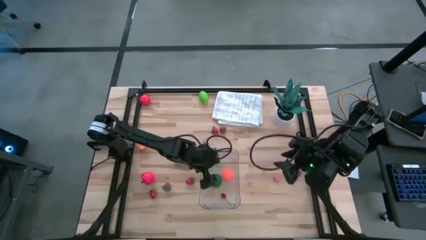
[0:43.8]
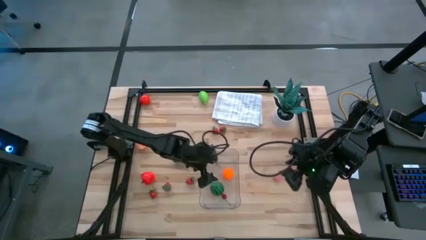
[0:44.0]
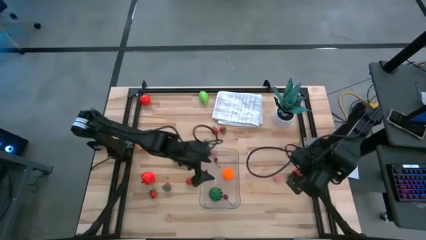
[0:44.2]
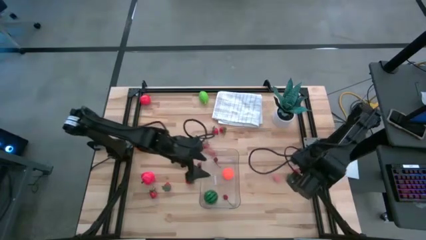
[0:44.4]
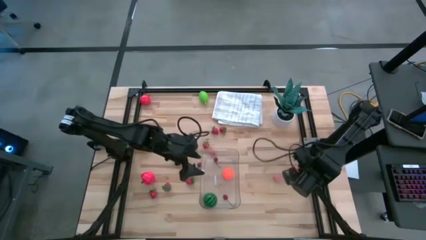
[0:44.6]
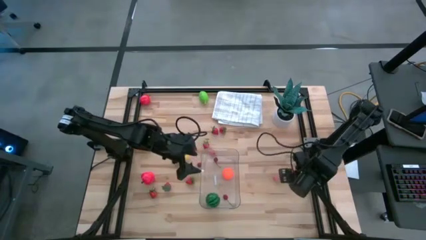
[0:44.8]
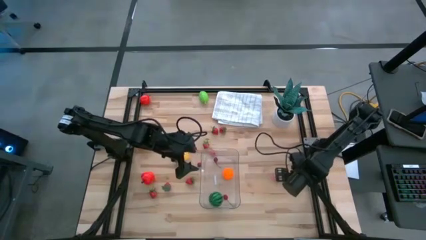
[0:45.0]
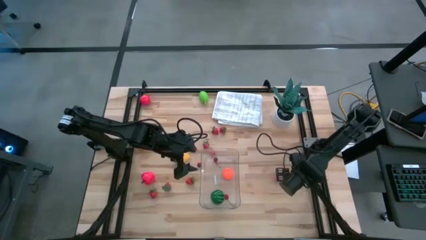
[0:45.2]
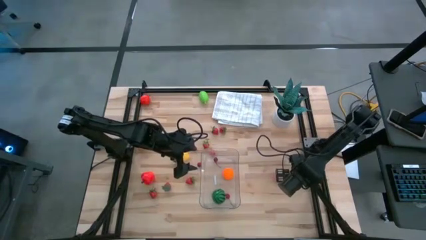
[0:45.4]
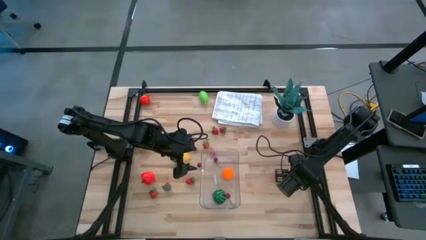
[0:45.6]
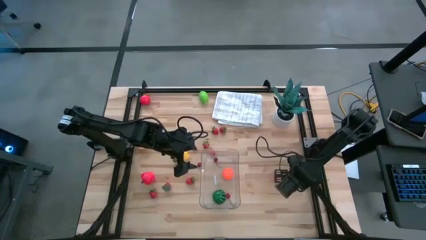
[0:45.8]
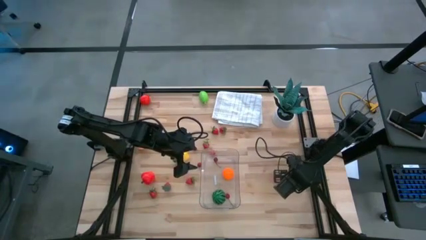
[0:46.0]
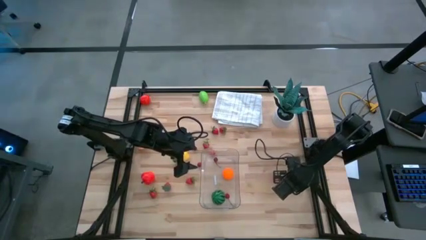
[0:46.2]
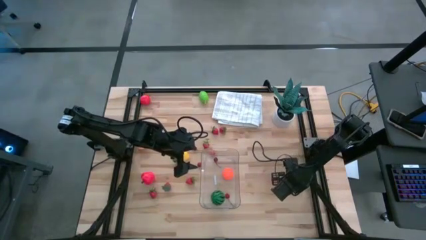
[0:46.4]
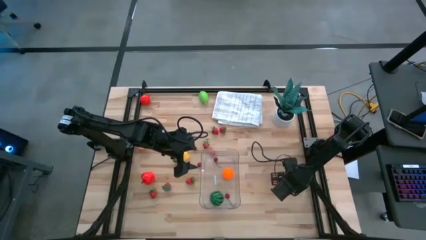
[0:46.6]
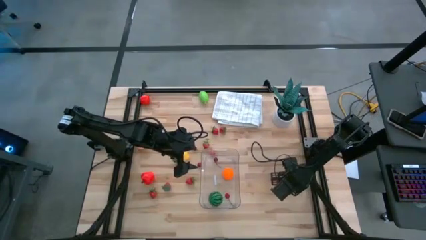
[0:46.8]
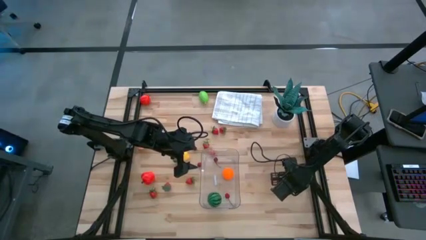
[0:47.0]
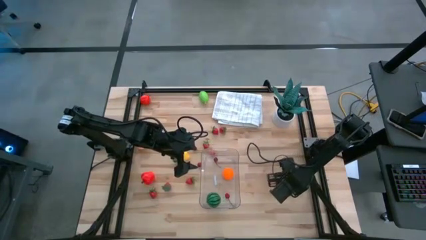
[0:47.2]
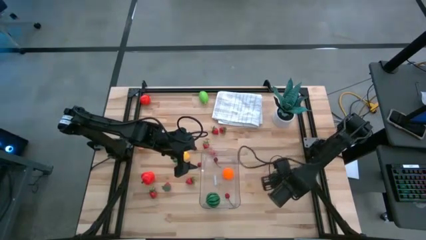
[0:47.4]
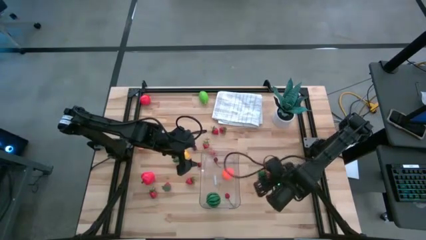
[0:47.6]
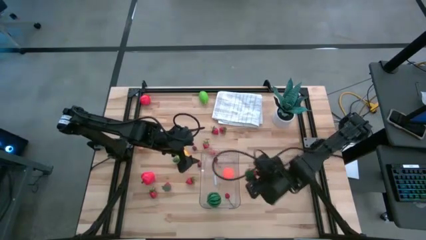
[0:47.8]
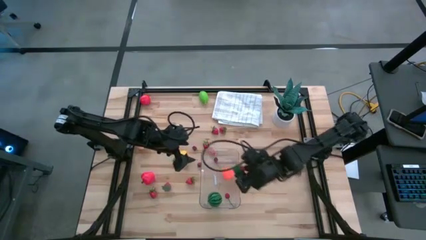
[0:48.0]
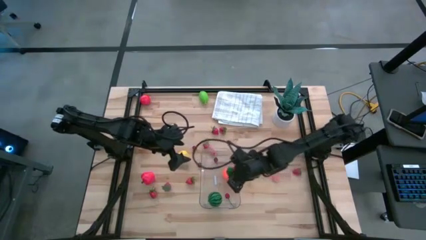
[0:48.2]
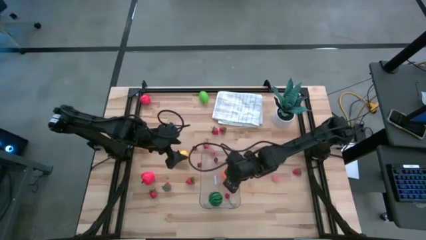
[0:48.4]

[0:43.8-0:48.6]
Task: Pick and placing Produce into tupperware
Put the orange tomato into the transparent bin

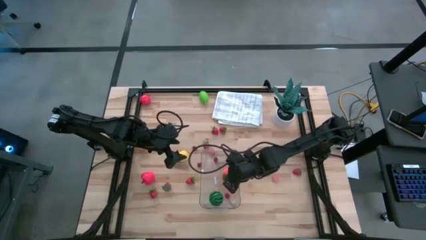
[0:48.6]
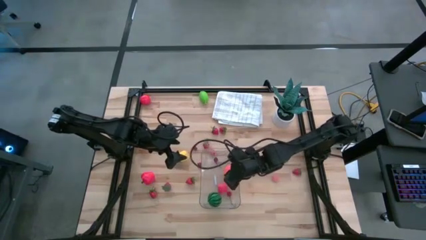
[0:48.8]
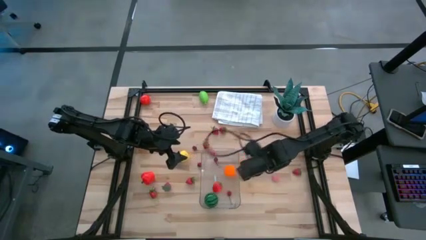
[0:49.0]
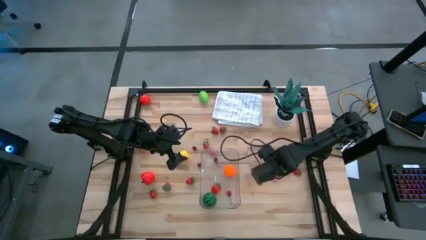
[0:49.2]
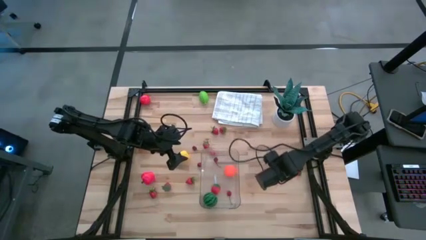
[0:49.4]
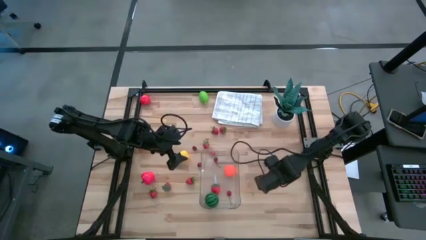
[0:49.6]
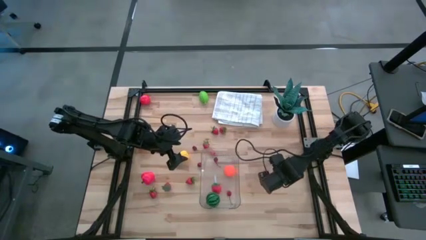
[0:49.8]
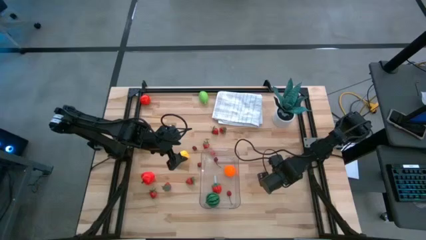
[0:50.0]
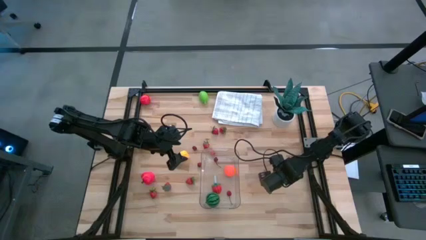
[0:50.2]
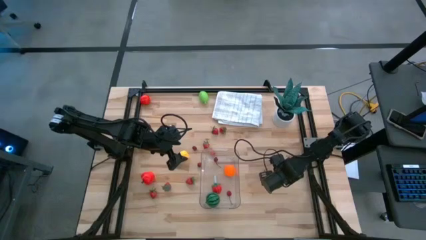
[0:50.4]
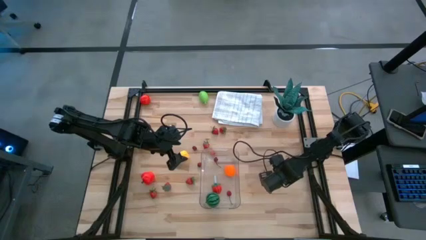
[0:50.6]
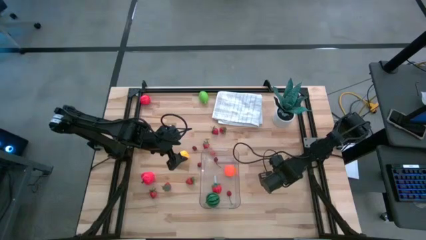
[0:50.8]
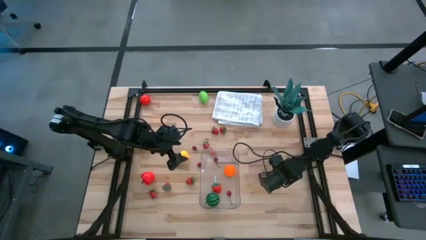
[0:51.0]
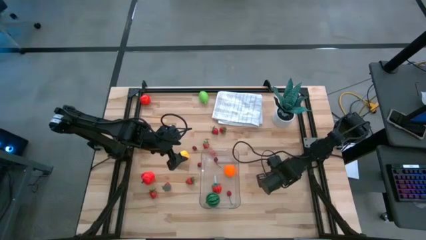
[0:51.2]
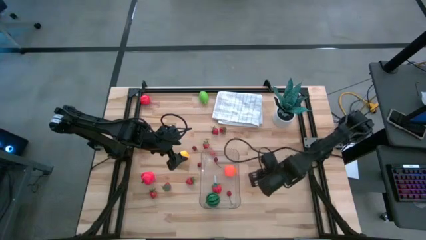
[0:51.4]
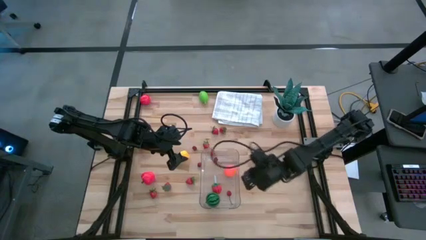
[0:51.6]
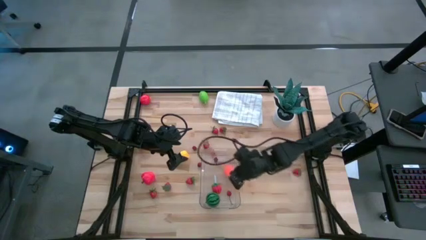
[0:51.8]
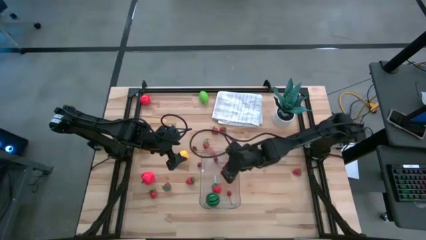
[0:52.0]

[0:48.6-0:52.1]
Put the pink peach into the transparent bin

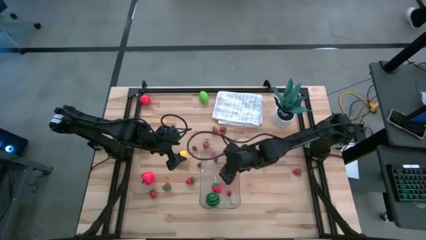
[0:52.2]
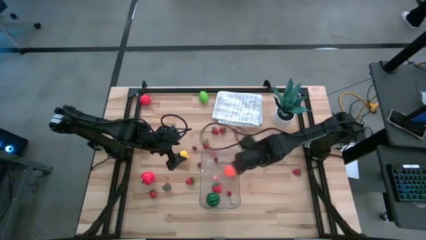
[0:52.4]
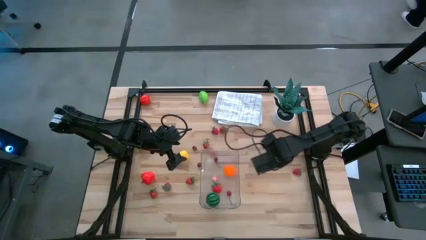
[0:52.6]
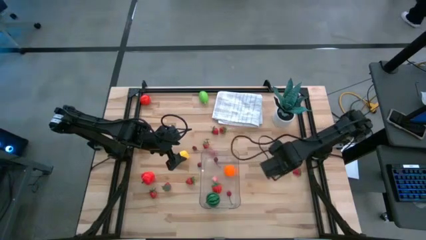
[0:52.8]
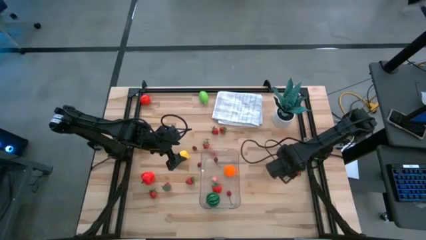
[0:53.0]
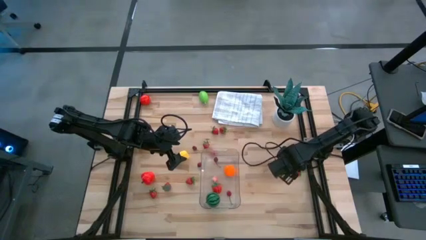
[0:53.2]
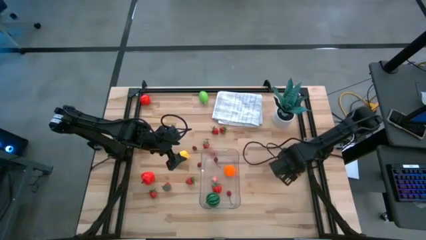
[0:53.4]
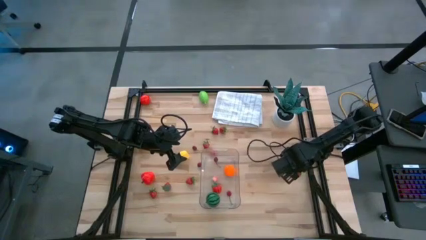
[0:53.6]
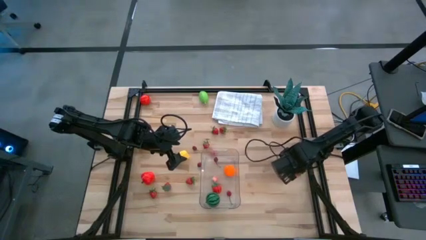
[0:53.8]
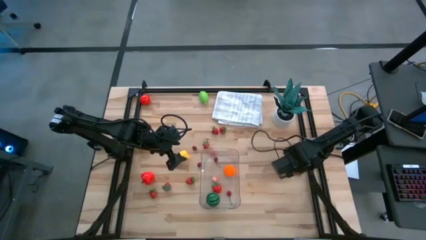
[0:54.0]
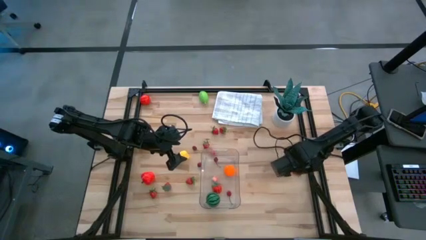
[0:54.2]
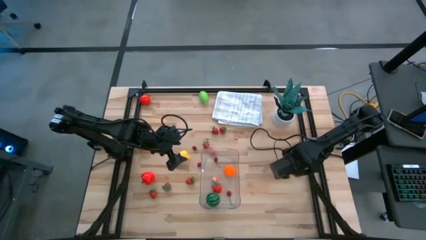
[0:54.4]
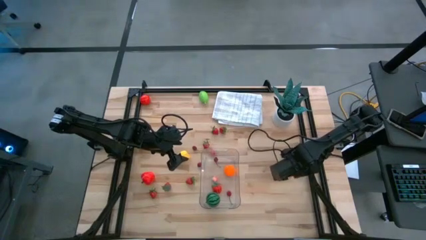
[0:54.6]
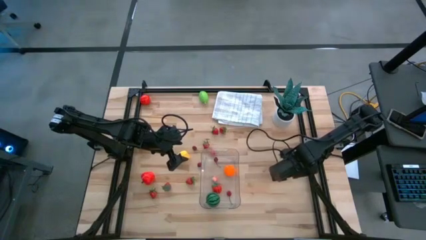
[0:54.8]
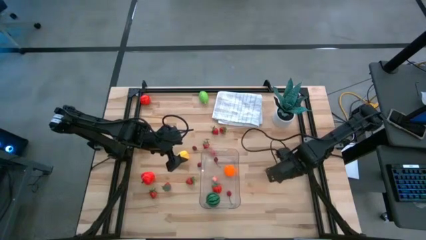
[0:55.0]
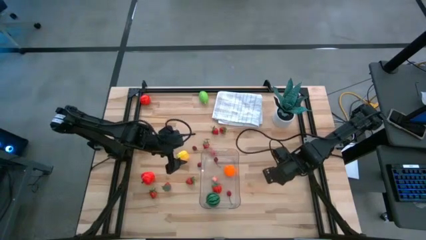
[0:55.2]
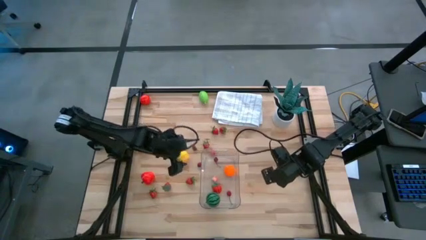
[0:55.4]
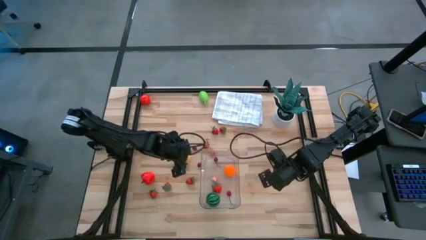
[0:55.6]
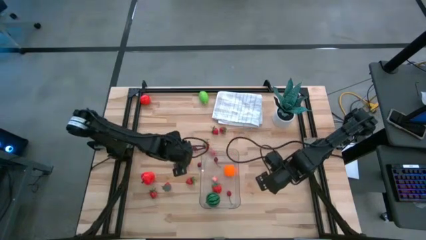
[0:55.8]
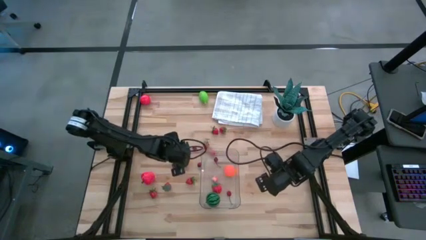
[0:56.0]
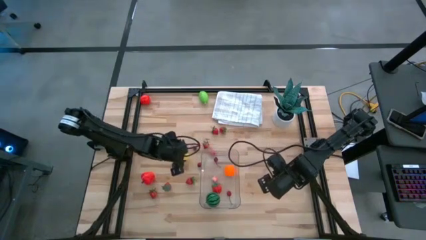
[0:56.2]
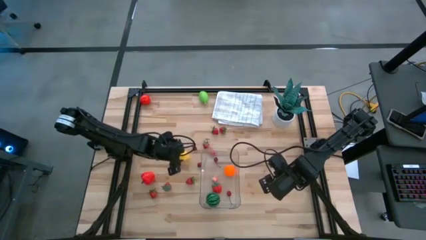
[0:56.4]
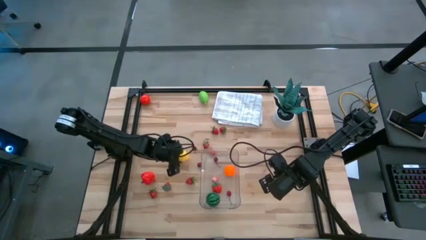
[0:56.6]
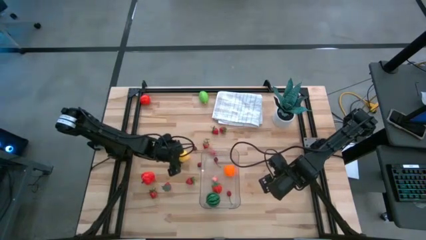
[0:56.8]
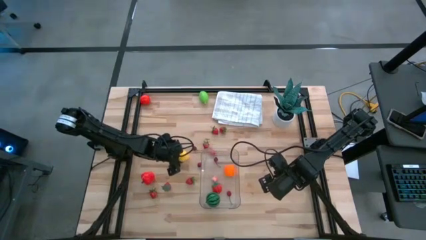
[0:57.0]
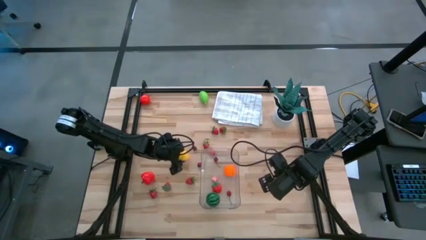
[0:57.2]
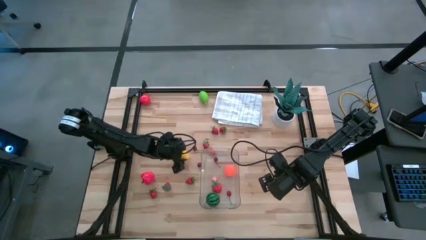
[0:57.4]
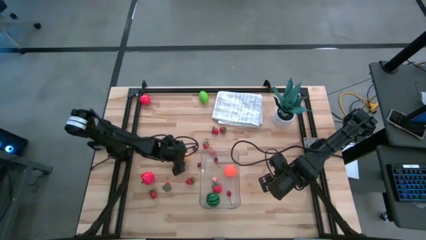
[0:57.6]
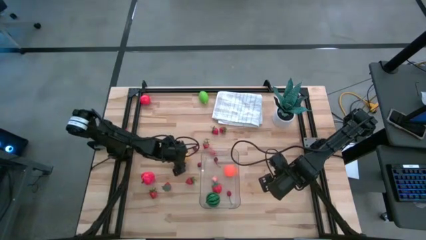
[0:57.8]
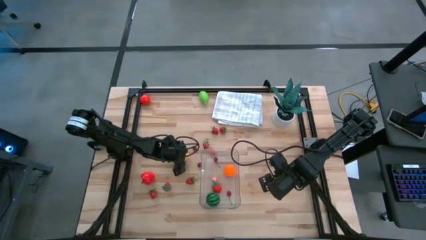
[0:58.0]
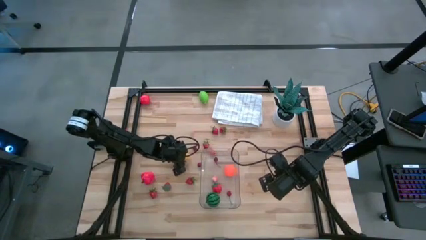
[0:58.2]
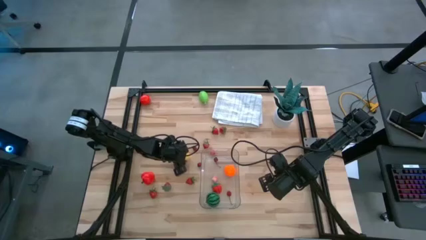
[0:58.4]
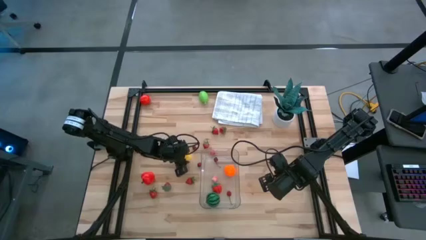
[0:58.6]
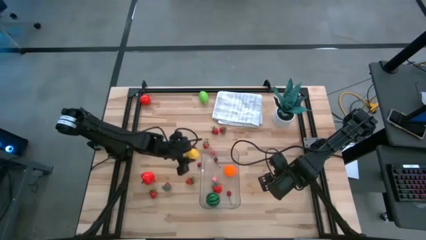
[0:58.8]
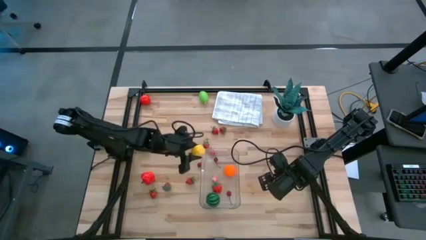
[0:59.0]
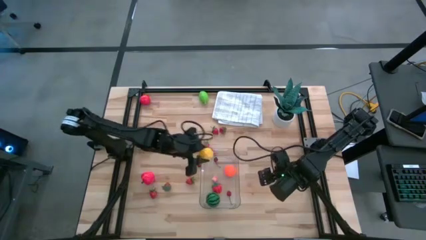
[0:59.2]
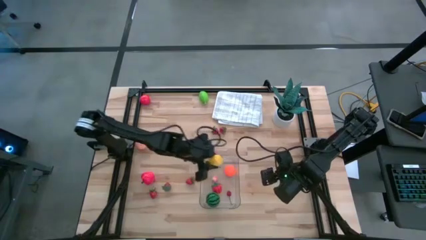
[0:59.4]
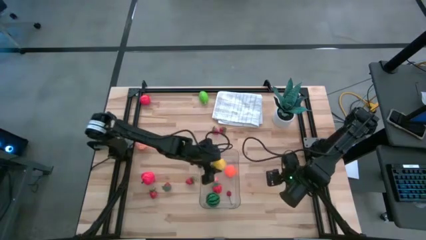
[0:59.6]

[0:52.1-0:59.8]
Put the yellow pineapple into the transparent bin

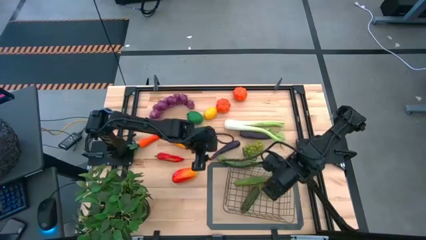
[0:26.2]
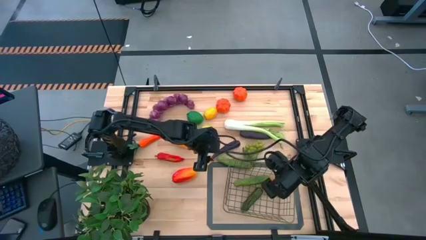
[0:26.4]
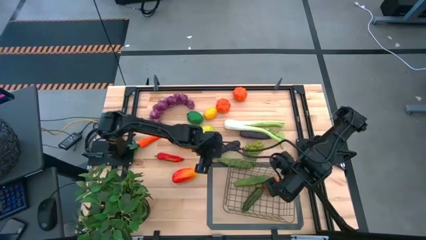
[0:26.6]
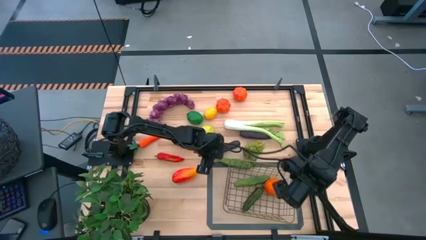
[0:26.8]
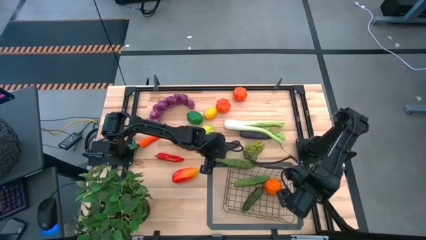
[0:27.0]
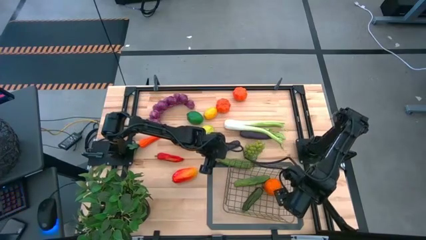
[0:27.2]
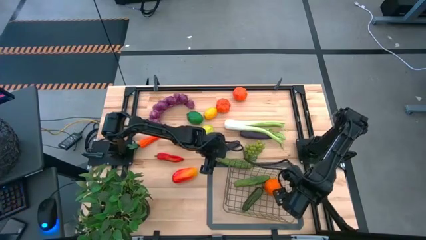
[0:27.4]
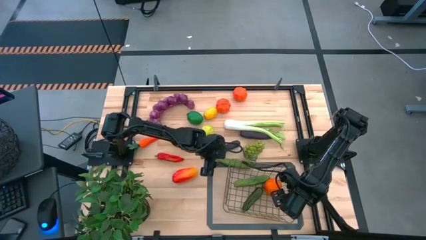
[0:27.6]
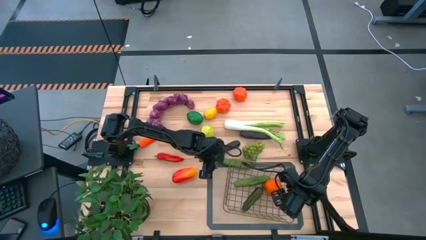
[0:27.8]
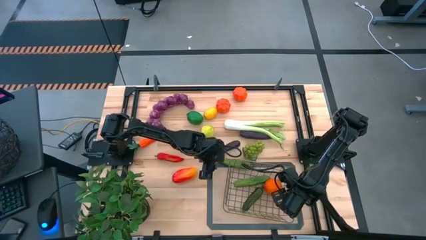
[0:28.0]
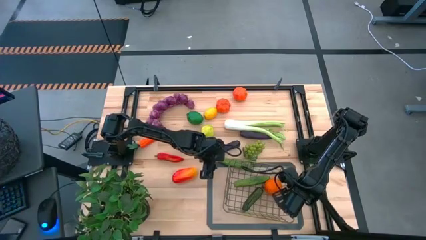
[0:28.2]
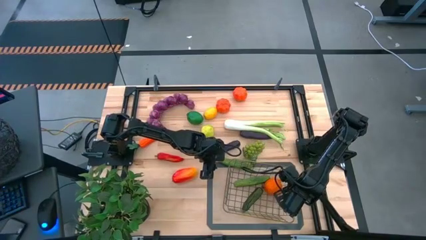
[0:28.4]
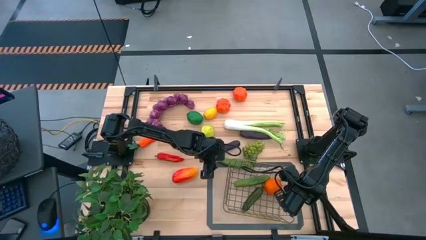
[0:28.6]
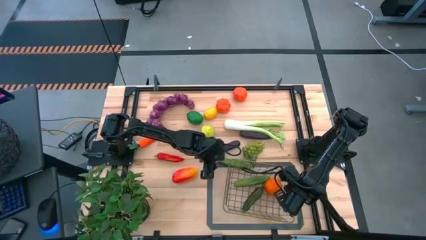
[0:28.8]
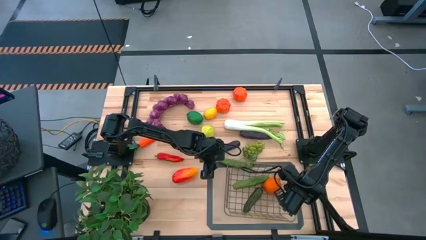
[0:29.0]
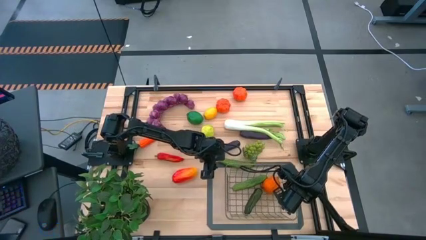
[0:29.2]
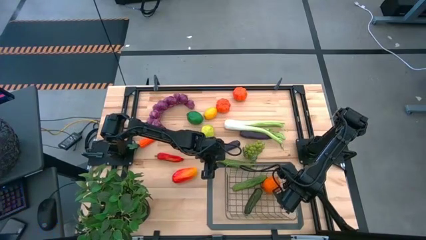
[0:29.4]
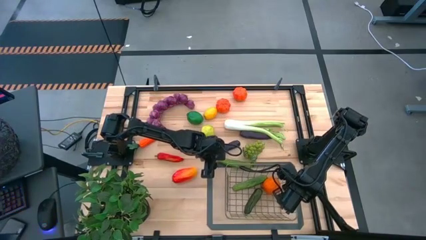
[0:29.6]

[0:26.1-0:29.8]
Task: Build produce basket
Adjust the wire basket
